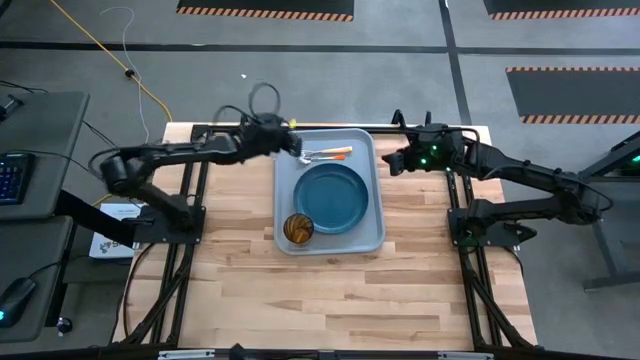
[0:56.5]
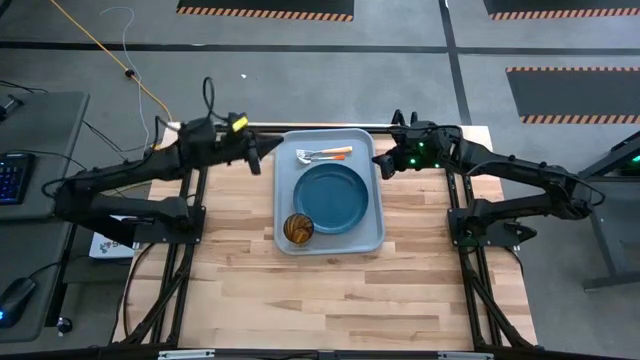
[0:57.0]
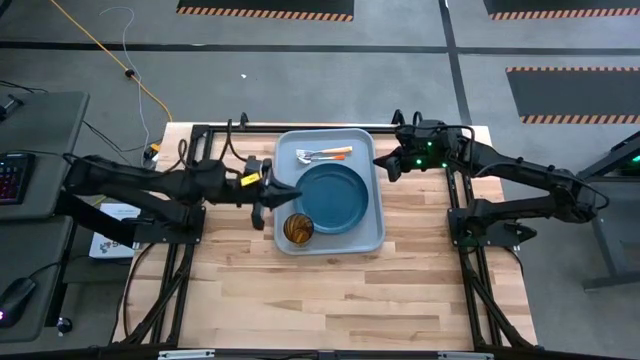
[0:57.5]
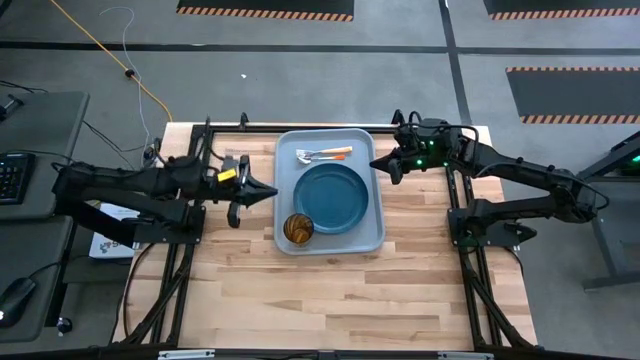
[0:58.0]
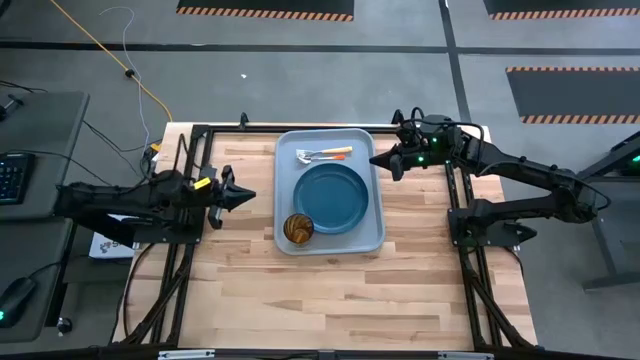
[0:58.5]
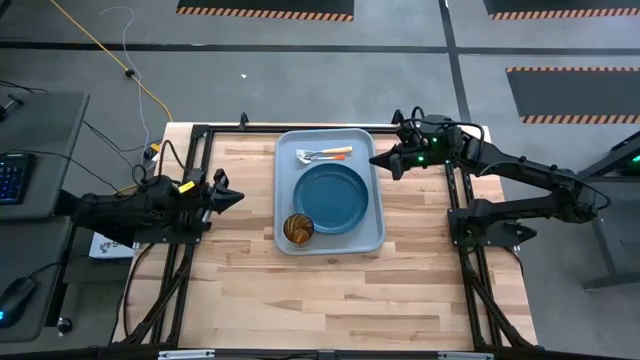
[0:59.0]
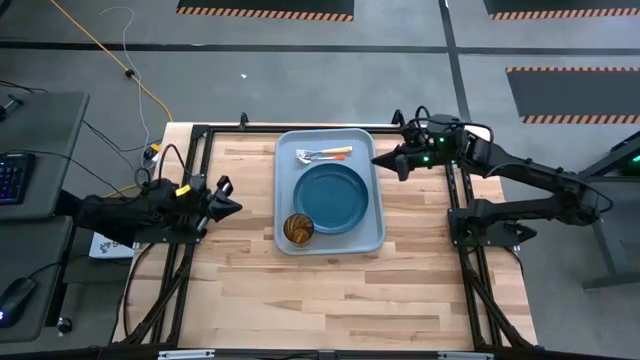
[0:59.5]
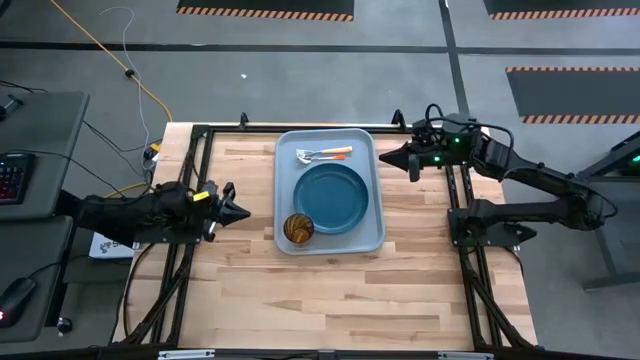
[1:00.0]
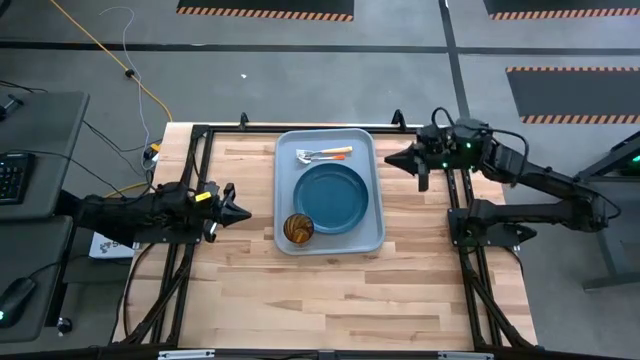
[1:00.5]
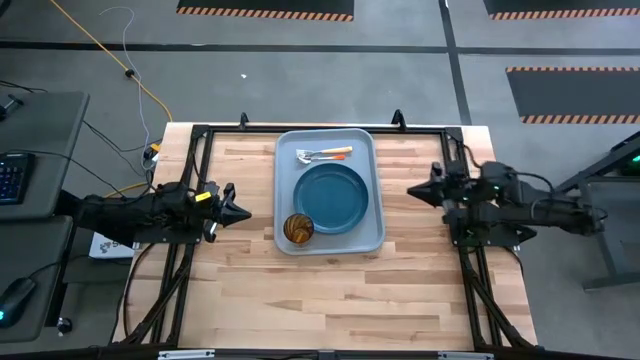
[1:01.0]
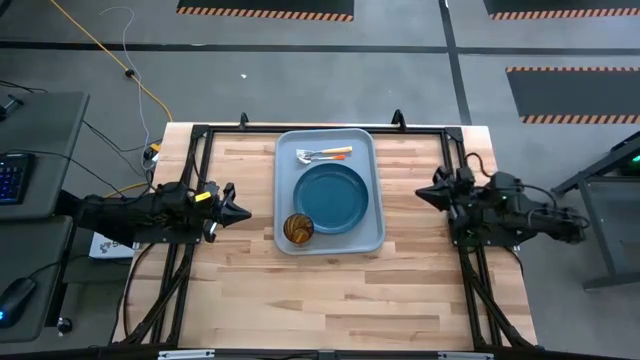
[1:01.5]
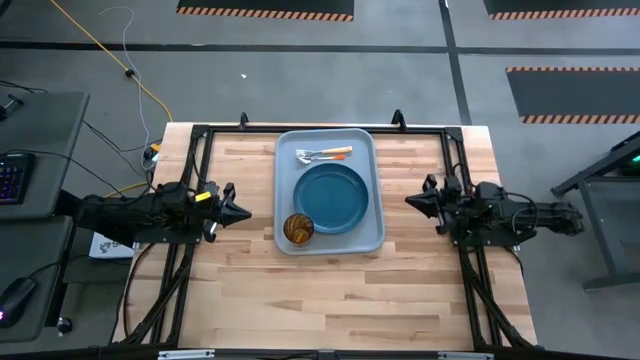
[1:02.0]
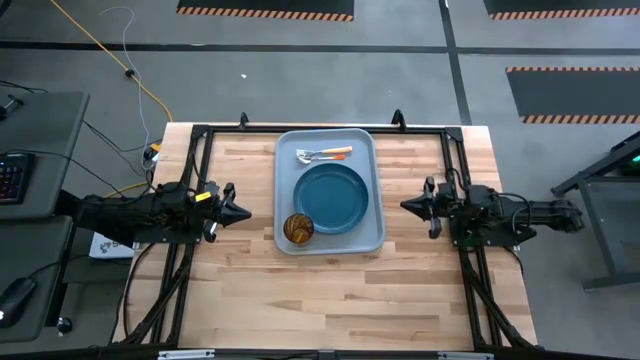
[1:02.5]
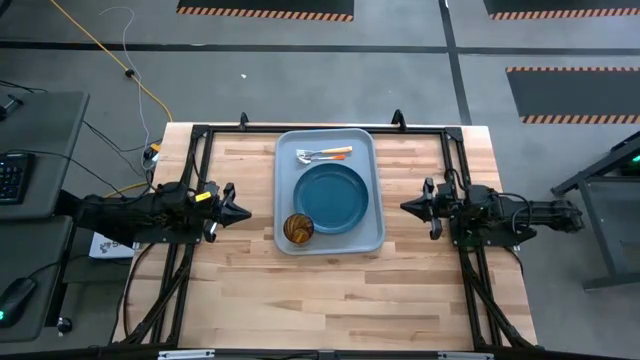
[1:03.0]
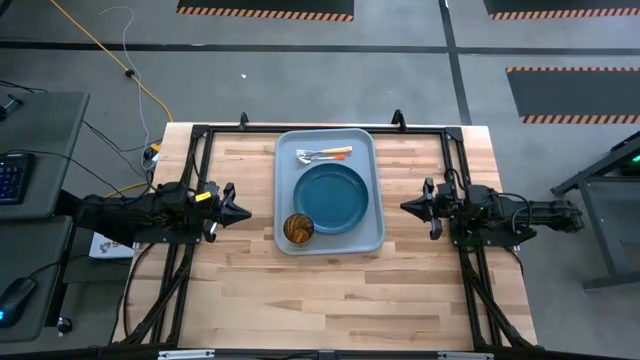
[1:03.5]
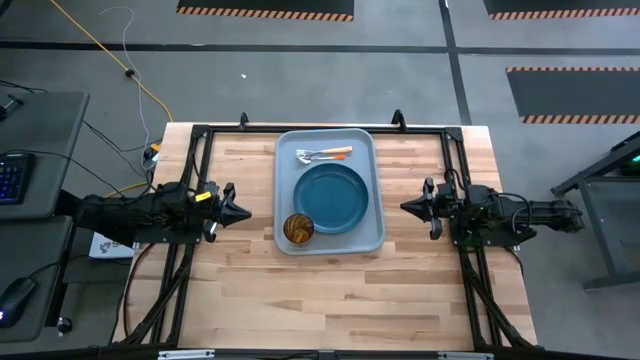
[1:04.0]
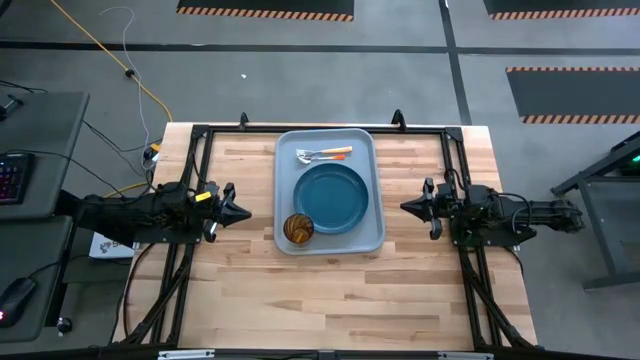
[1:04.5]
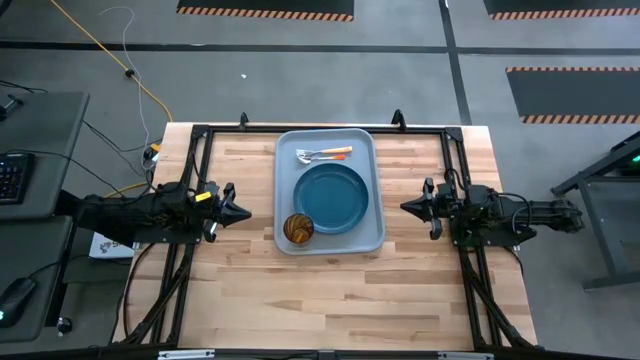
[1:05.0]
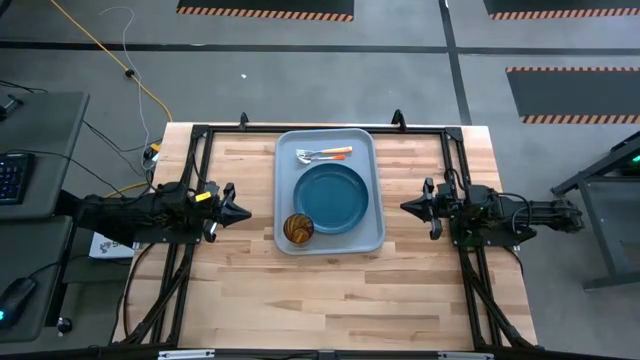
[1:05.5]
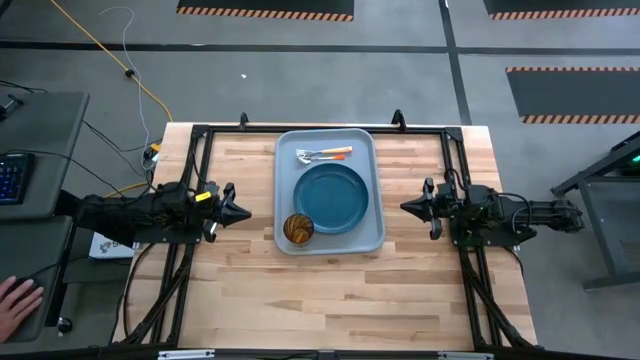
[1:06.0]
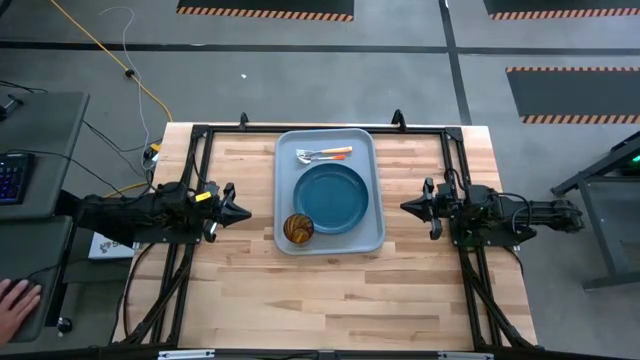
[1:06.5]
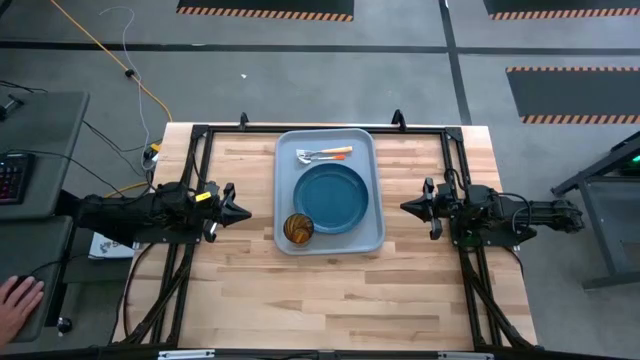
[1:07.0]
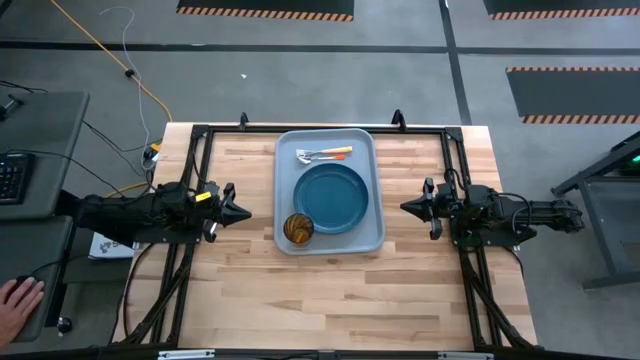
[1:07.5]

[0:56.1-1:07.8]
Task: Pick and place plate/cup/fork/spoon on tray
Return to Home Position

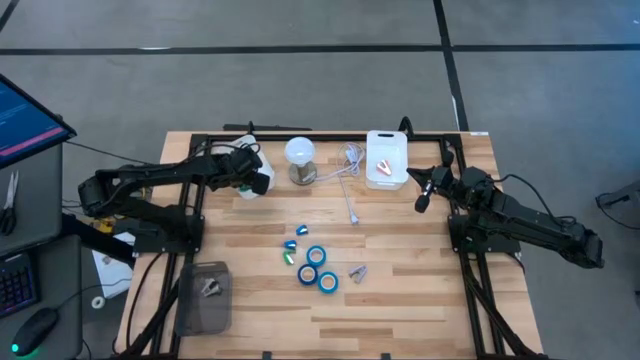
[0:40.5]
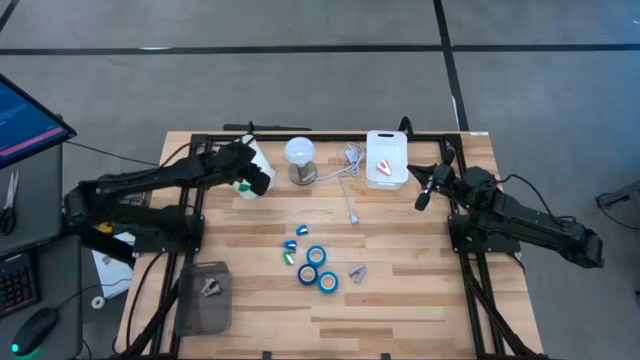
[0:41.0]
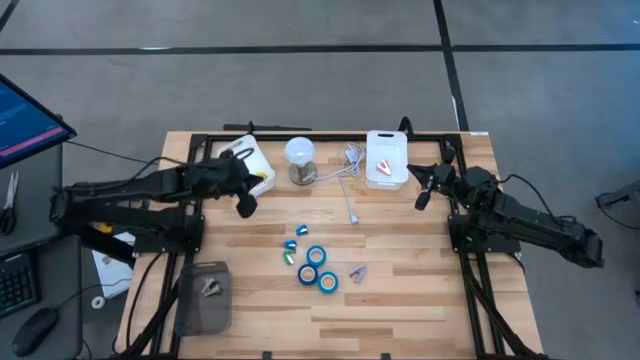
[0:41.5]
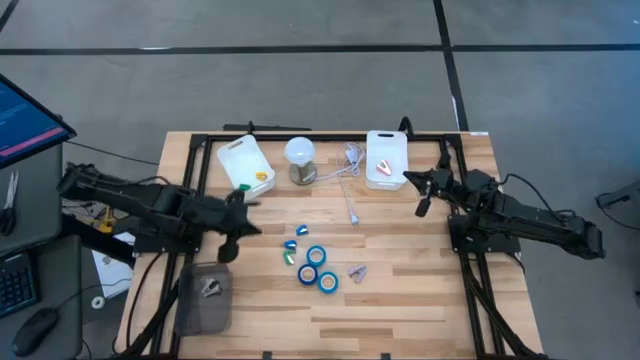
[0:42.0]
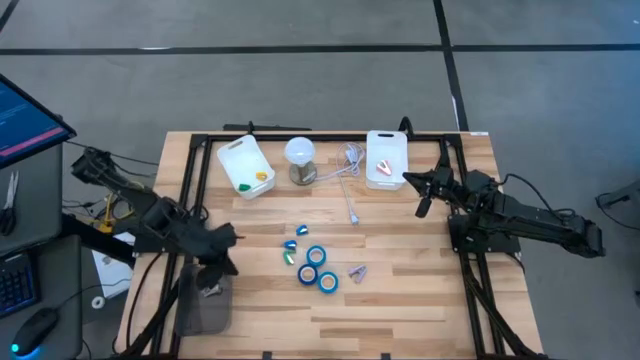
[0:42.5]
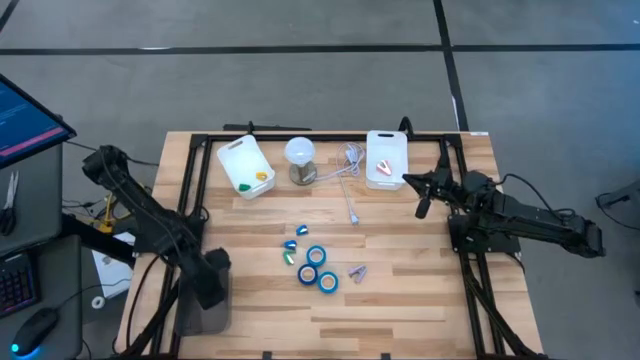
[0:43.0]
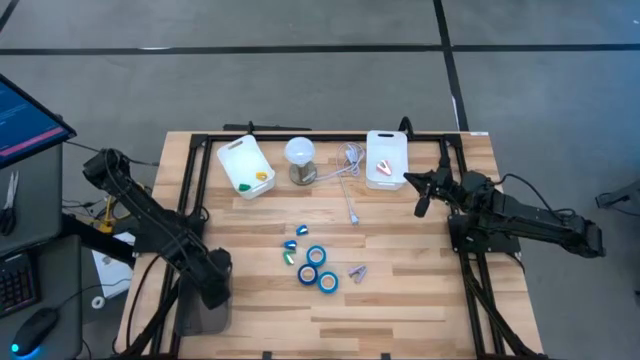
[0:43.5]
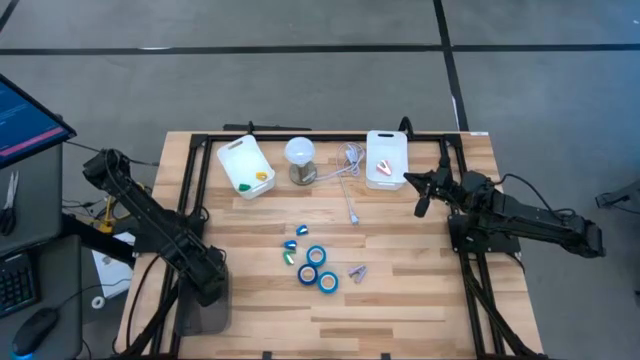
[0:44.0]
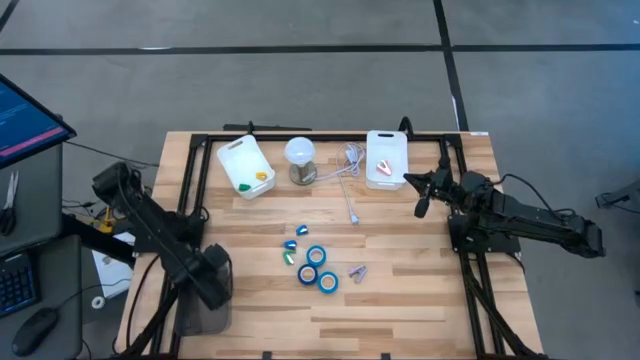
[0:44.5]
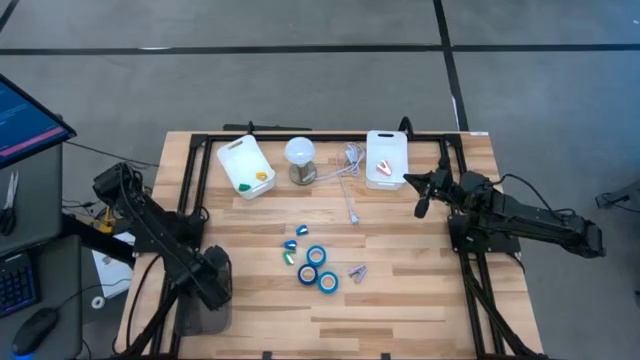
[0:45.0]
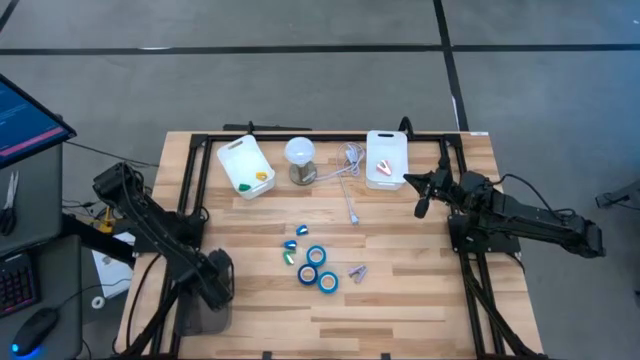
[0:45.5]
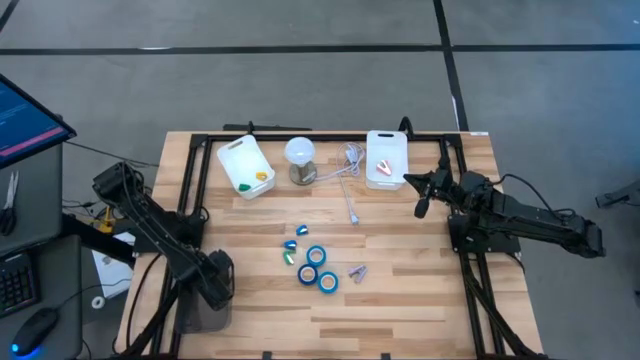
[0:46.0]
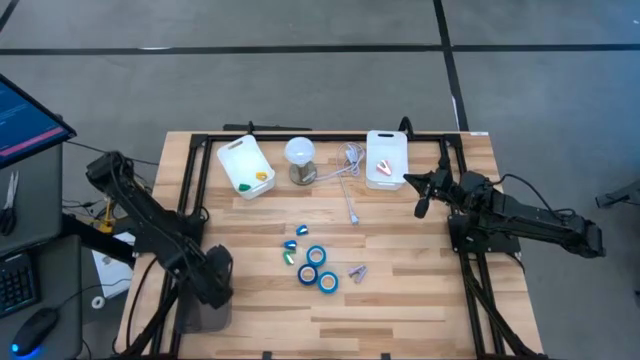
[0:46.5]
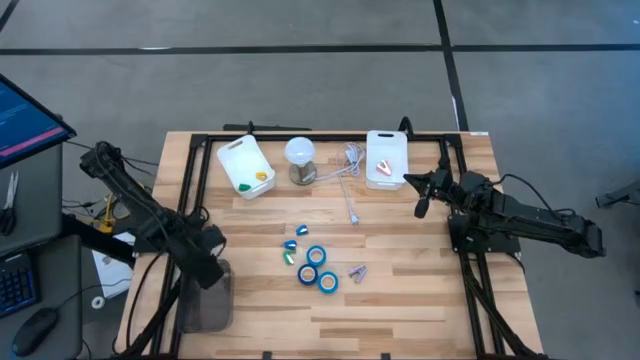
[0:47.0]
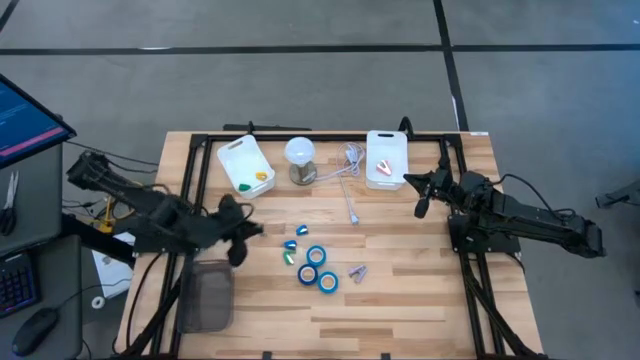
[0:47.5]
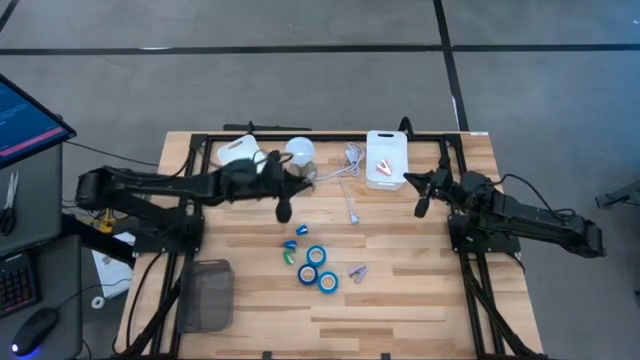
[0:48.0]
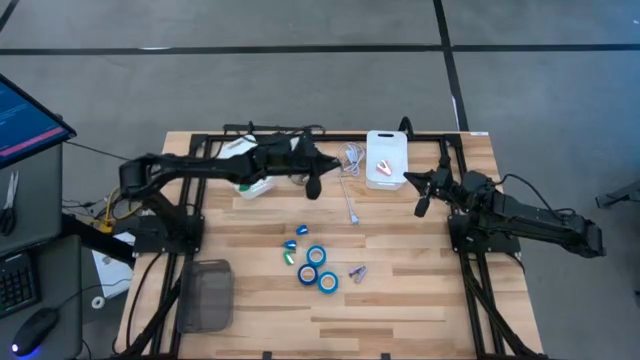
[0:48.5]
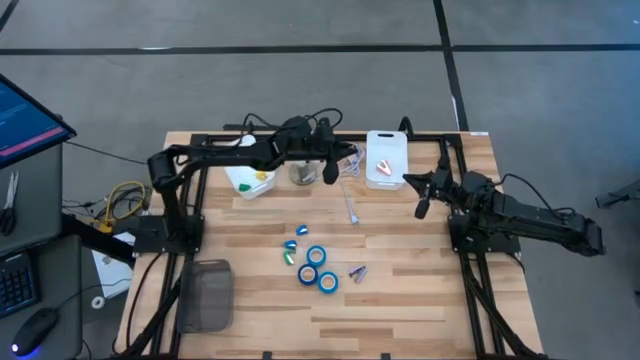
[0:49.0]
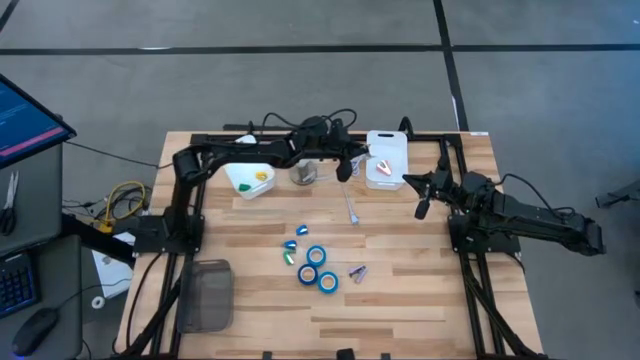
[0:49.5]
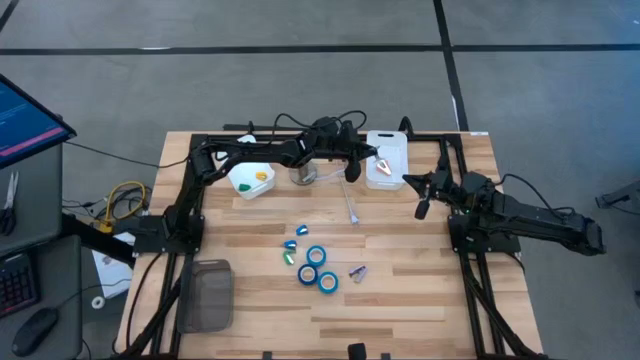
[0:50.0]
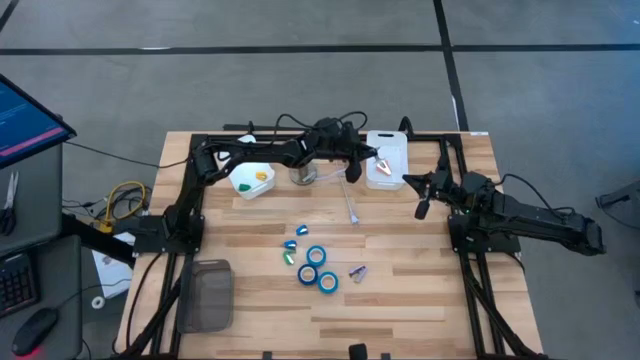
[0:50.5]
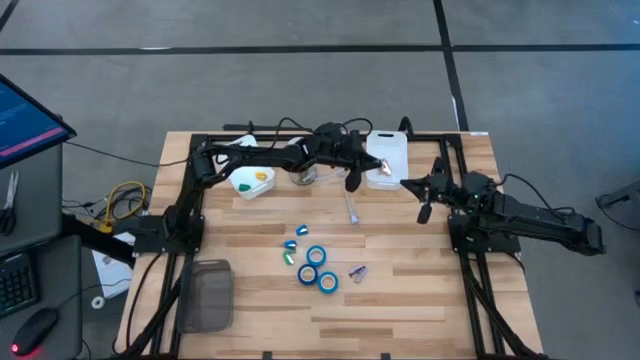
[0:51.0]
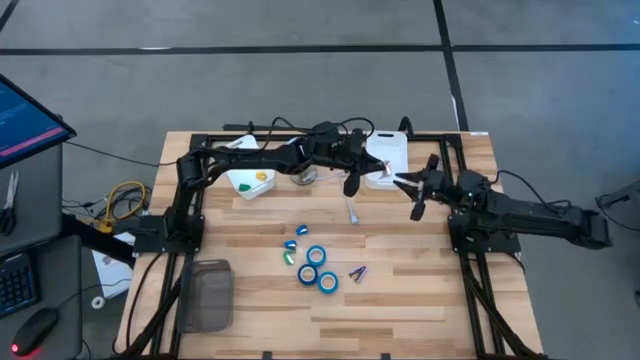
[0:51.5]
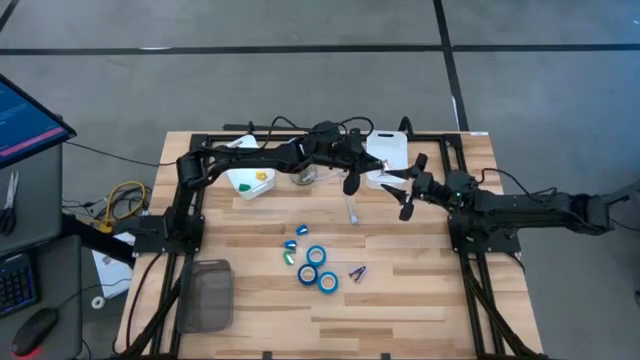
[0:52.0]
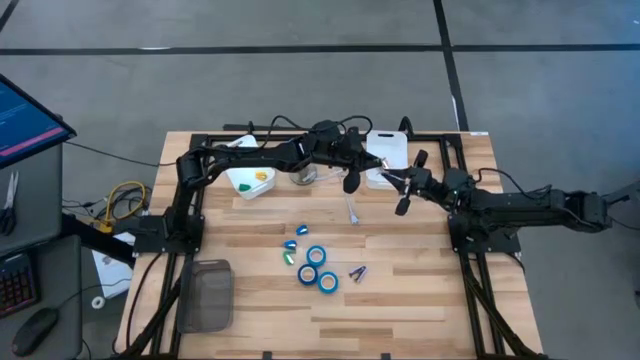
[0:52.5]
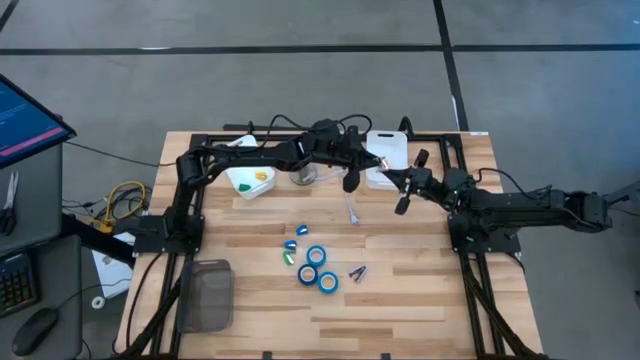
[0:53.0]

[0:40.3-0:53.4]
Task: Pick and place Stapler, Stapler remover, tape
Put the gray staple remover into the right white bin
